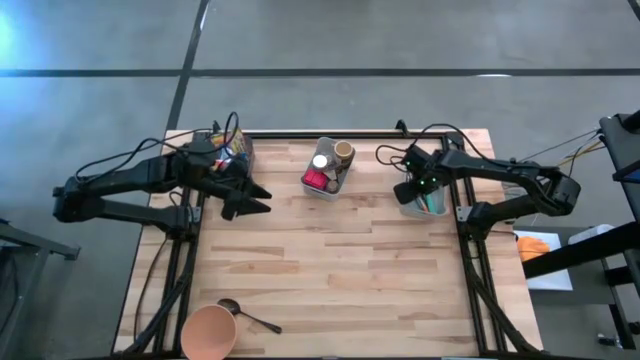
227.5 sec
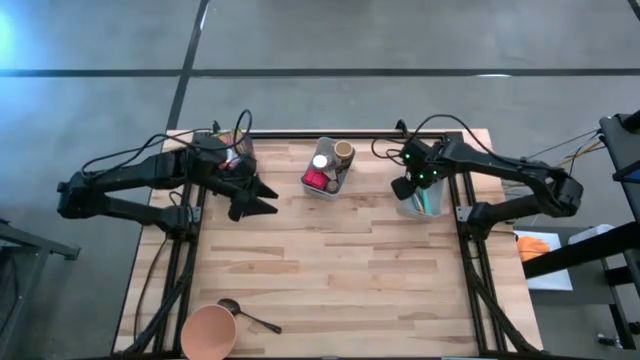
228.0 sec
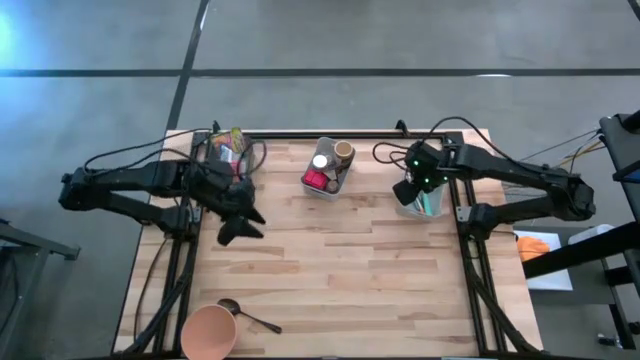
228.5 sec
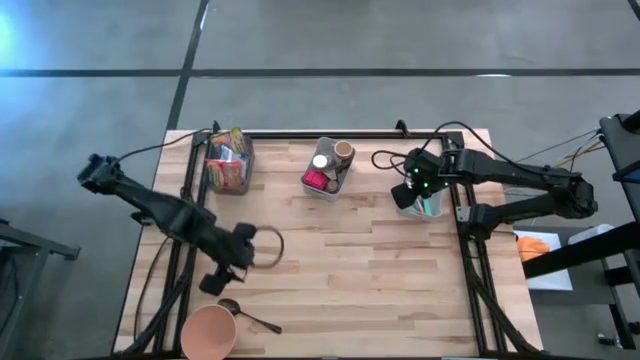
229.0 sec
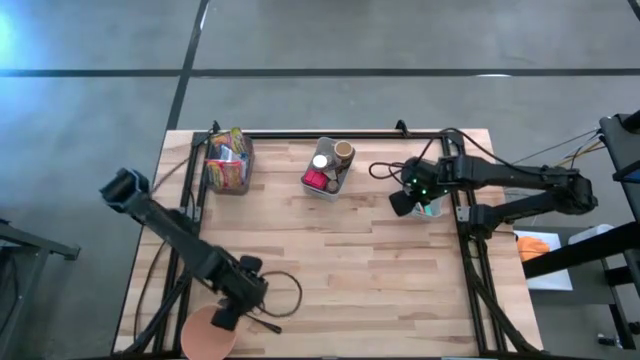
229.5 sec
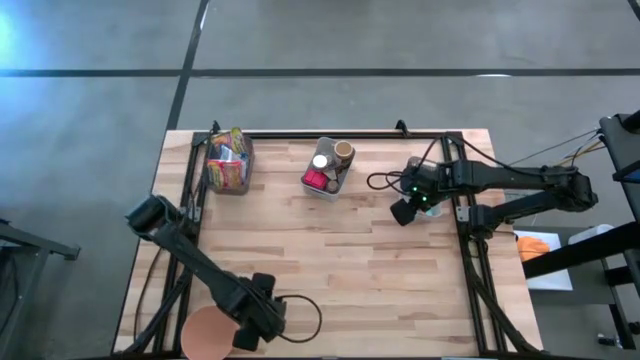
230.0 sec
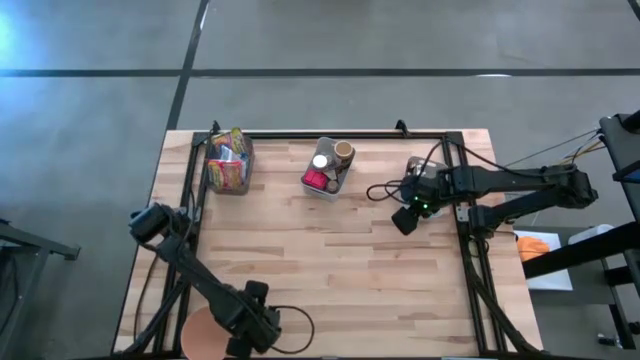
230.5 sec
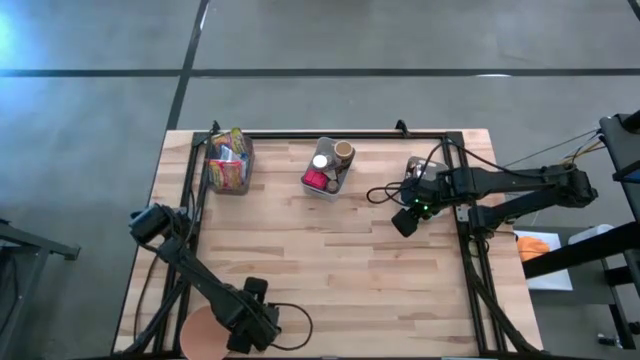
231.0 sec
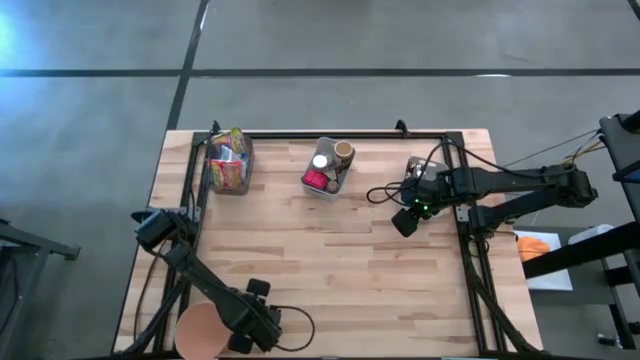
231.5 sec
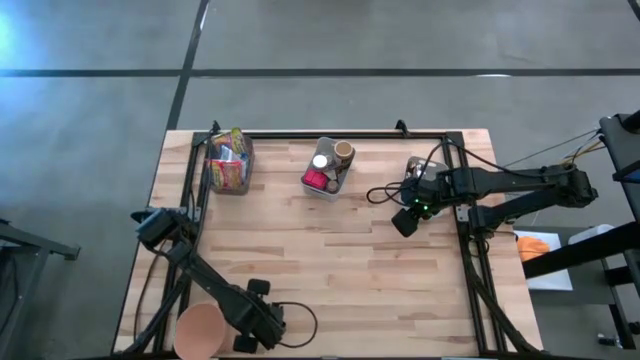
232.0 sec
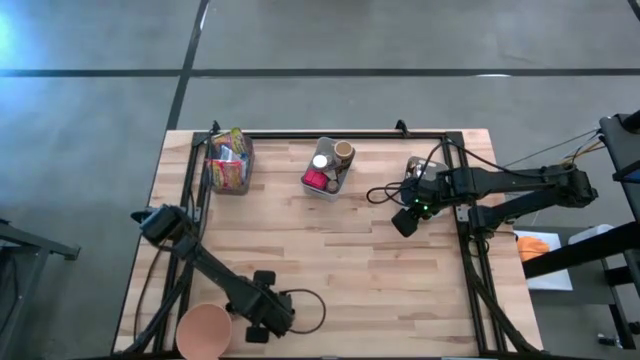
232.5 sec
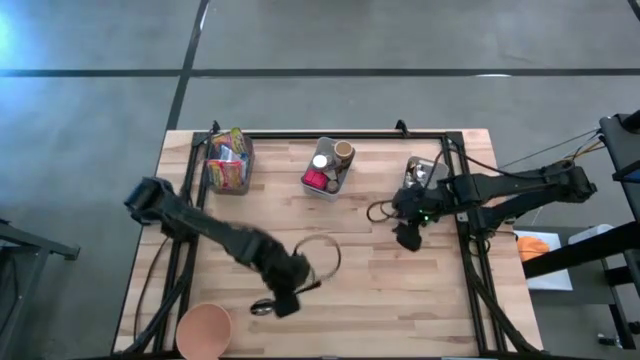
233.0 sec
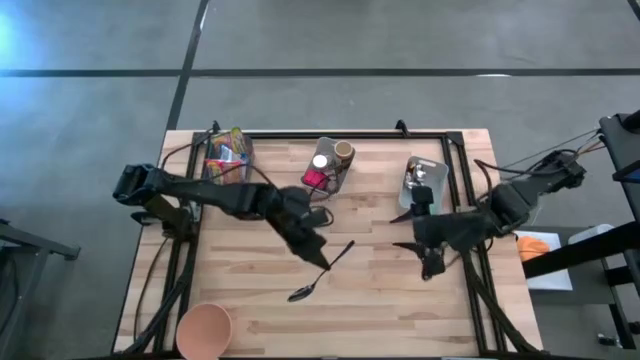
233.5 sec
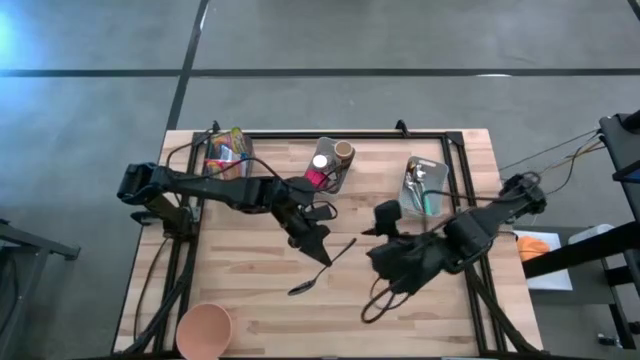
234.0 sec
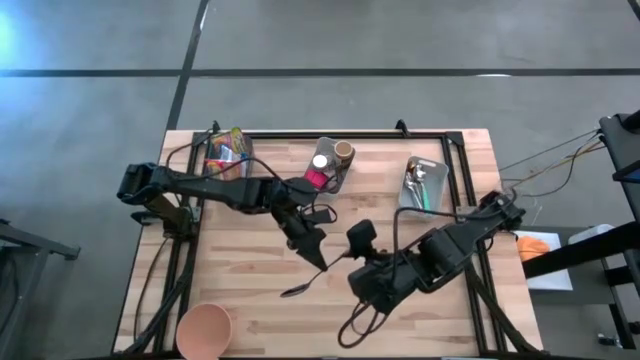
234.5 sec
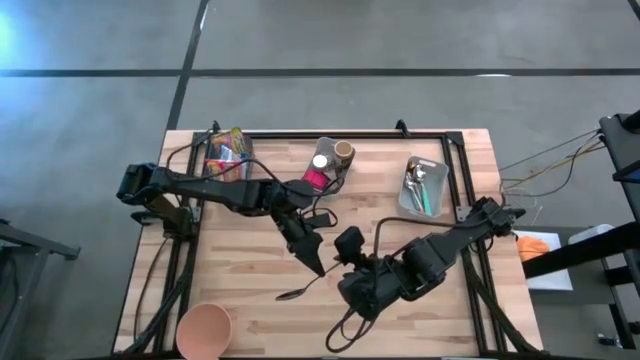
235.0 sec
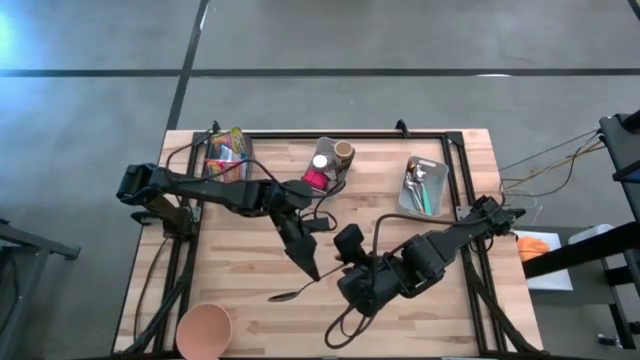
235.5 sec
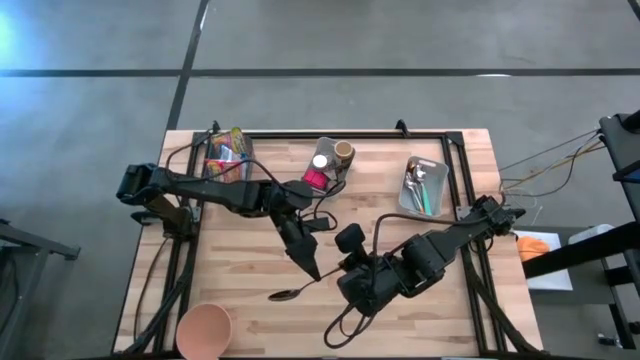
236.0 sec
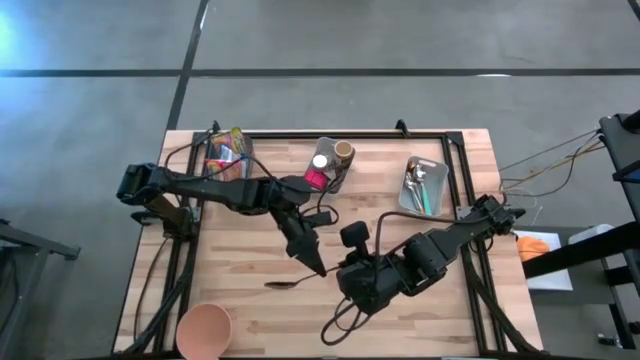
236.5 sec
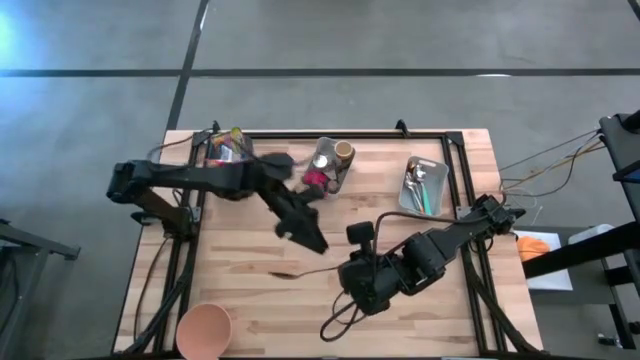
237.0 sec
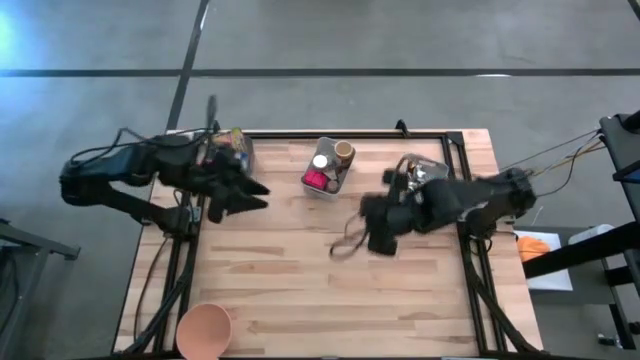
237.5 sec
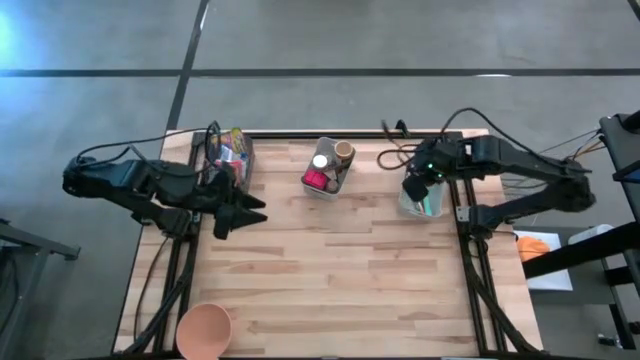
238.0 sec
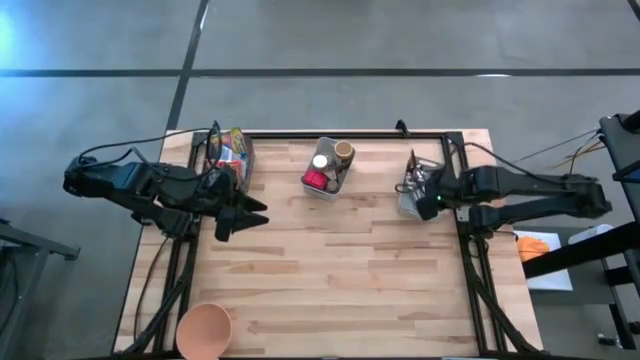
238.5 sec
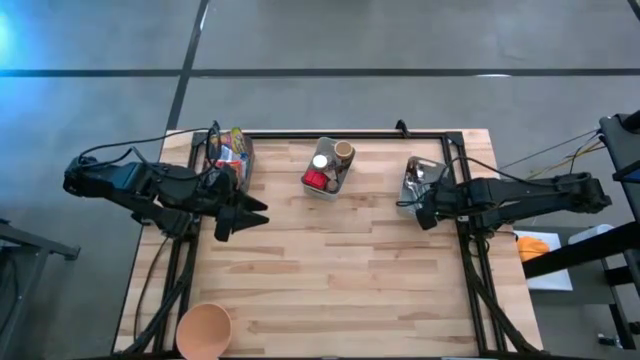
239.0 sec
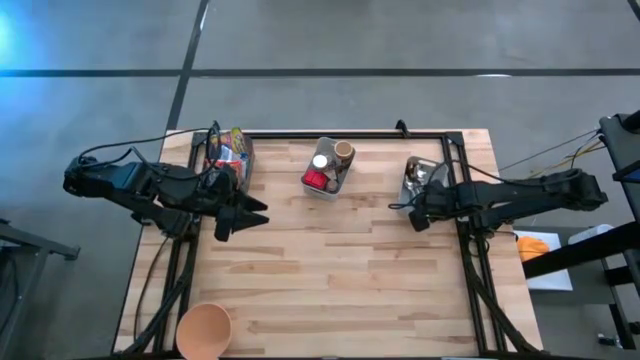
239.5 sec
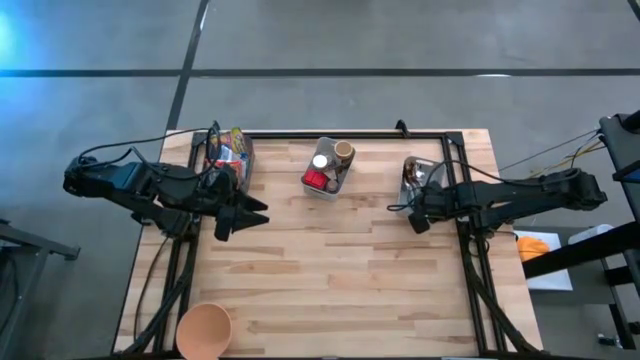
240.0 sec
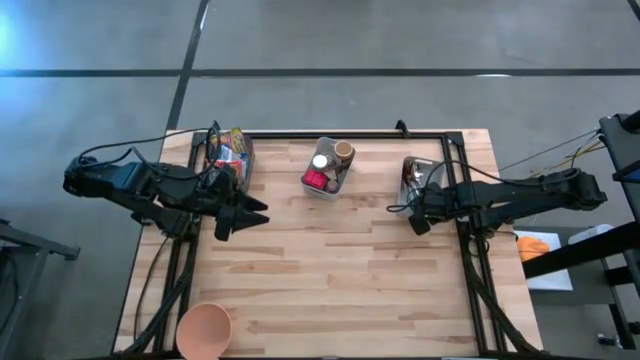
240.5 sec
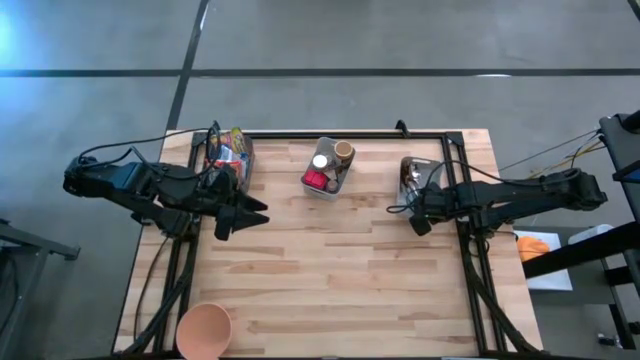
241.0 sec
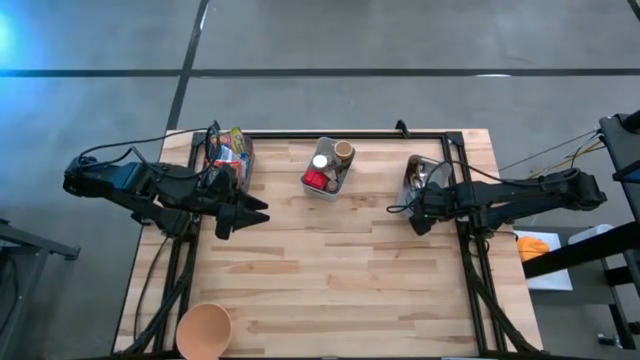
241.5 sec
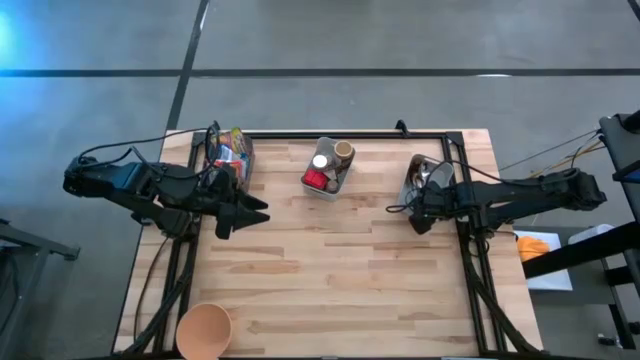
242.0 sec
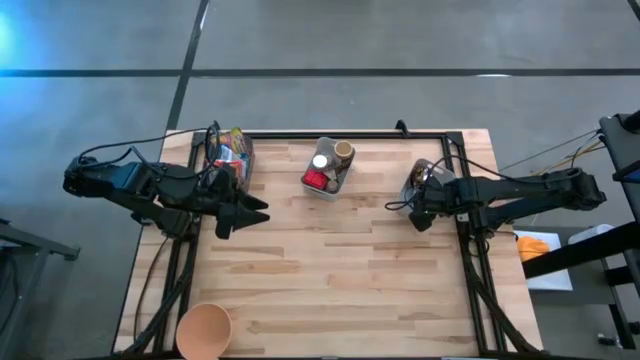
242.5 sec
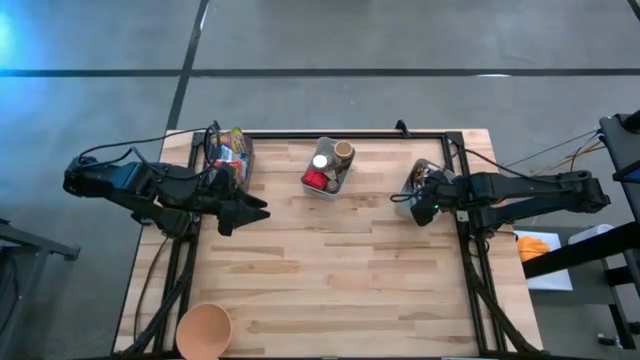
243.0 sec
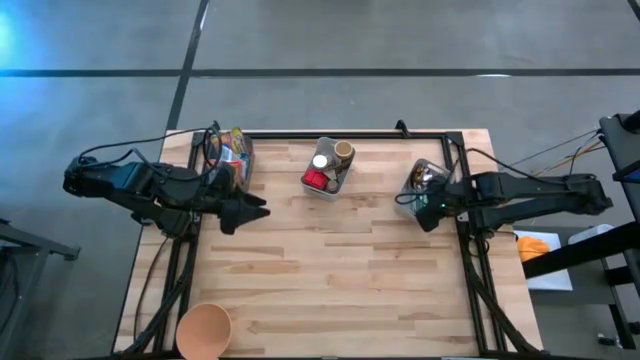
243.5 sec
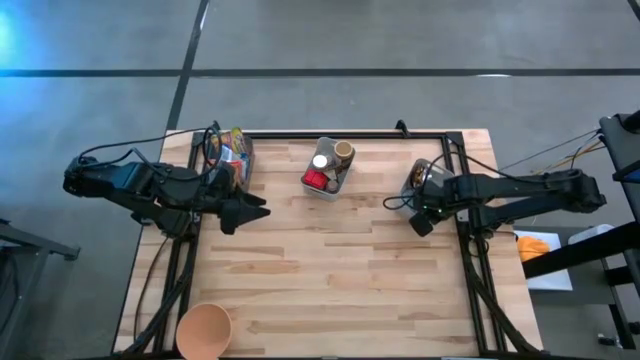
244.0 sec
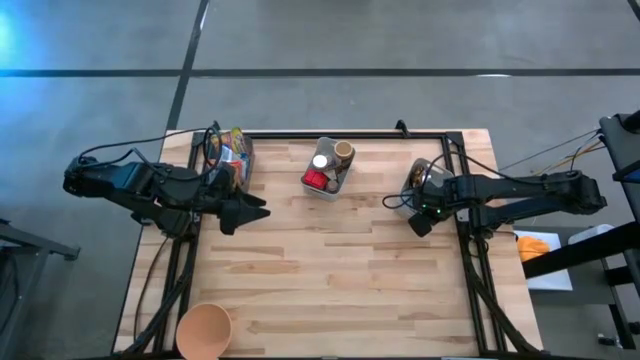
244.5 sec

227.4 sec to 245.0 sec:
Put the black spoon into the right gray bin

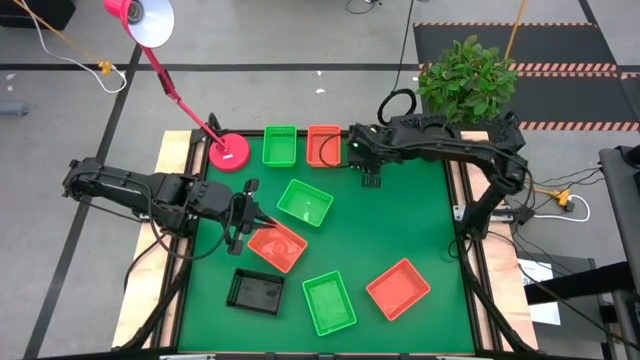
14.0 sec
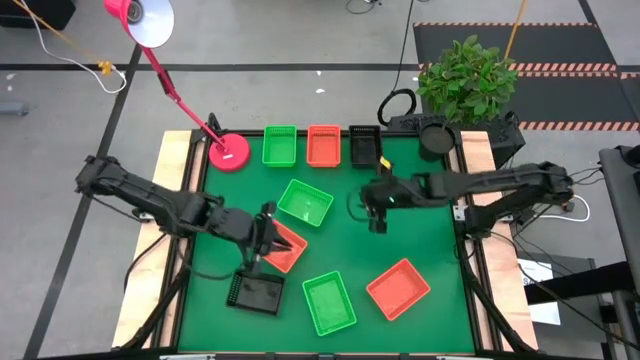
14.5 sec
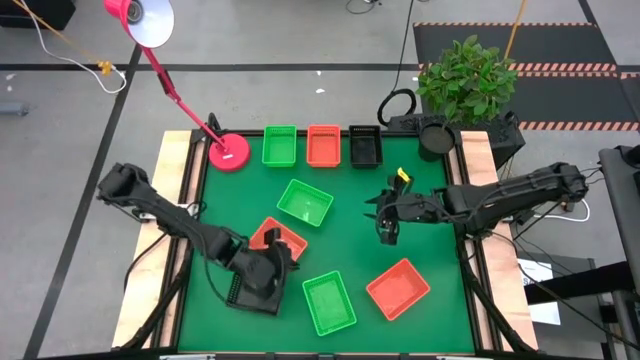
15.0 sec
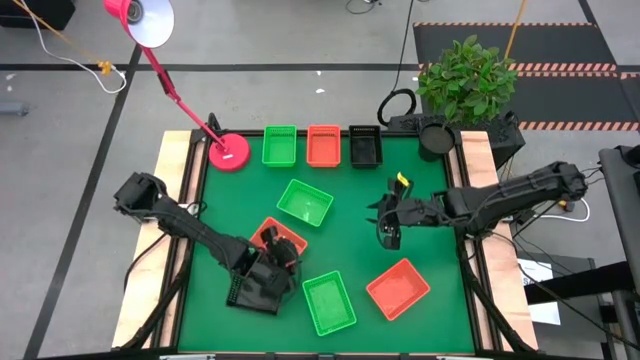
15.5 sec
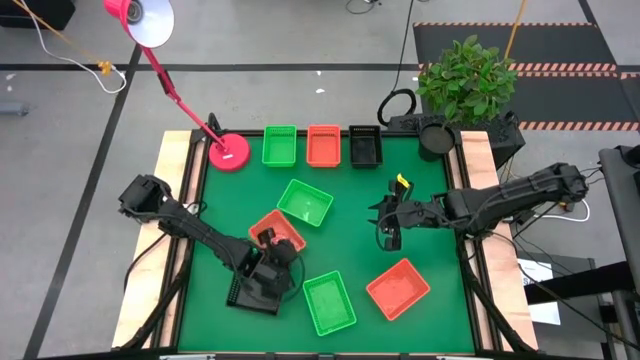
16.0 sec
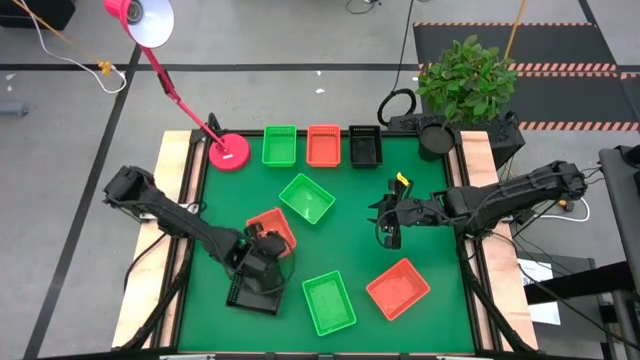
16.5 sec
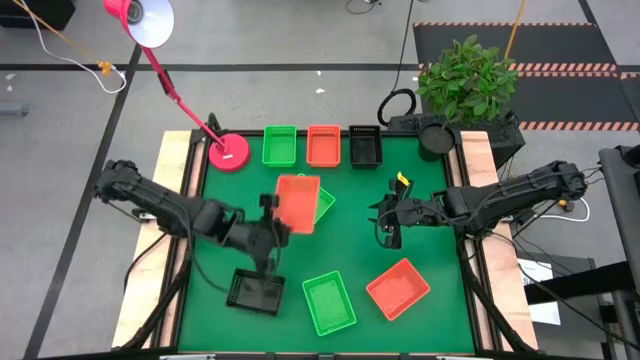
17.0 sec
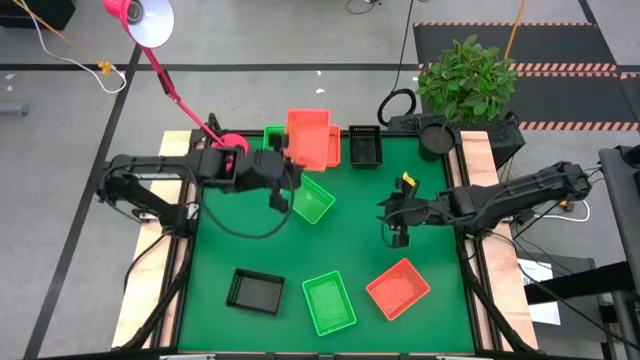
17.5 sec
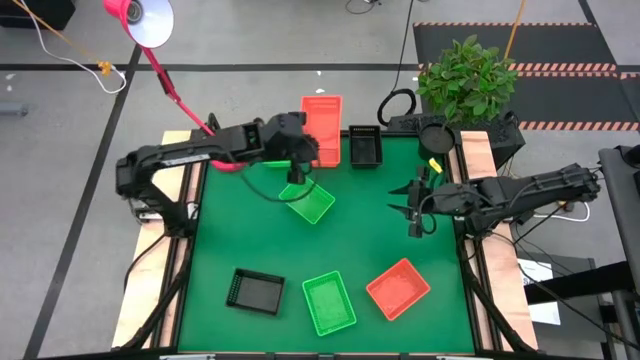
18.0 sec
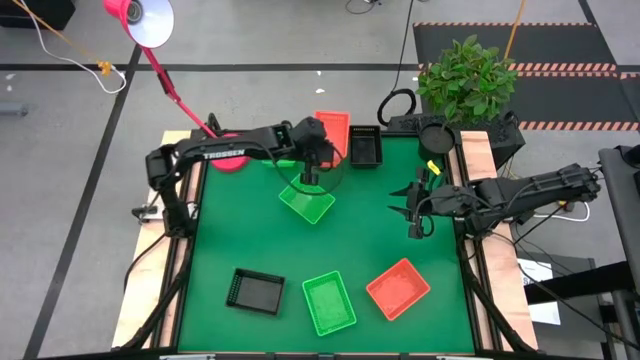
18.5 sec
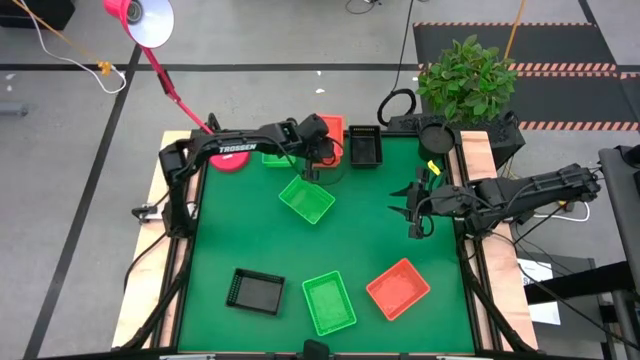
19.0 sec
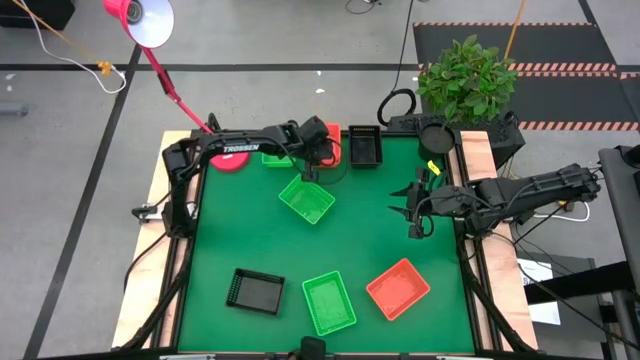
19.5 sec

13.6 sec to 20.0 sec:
Stack the middle left orange basket on top of the top orange basket
